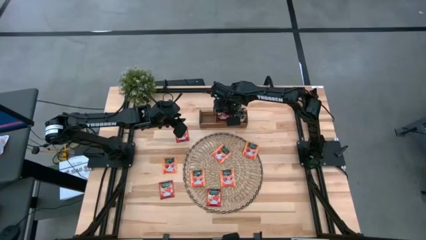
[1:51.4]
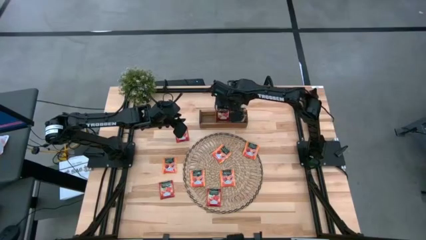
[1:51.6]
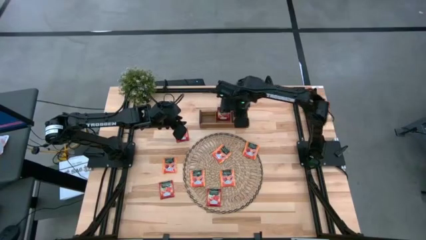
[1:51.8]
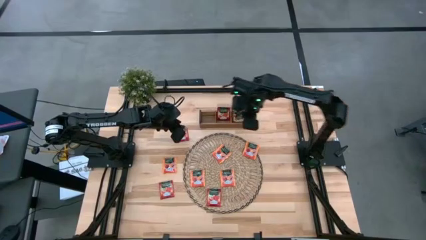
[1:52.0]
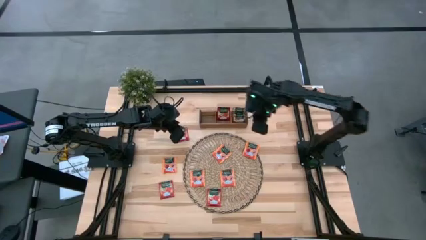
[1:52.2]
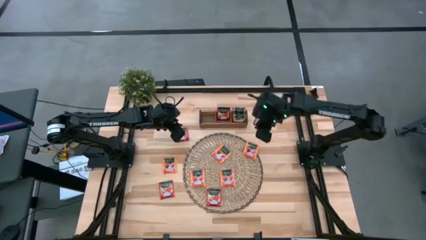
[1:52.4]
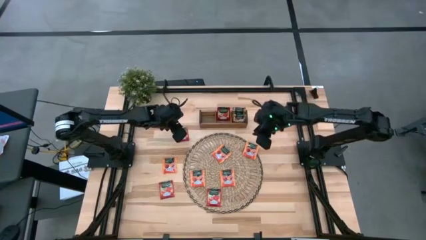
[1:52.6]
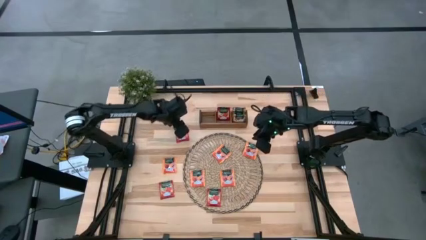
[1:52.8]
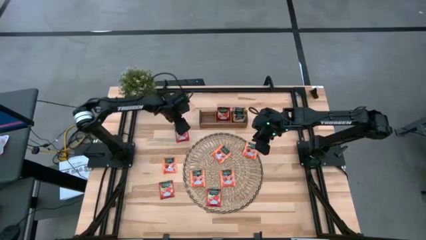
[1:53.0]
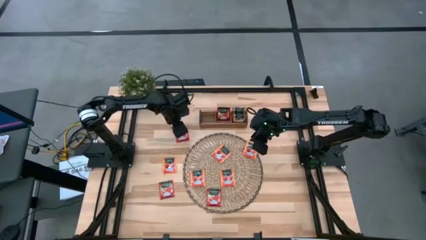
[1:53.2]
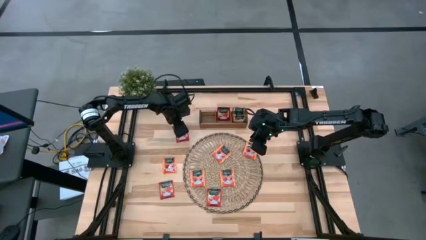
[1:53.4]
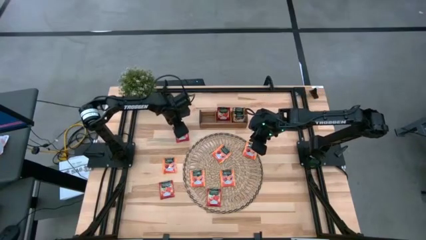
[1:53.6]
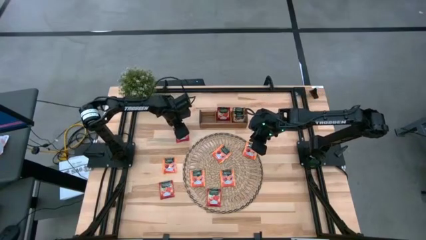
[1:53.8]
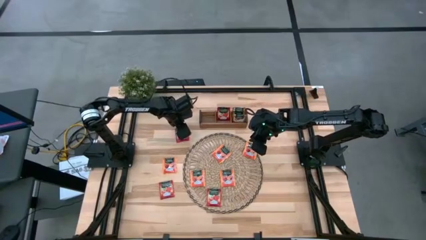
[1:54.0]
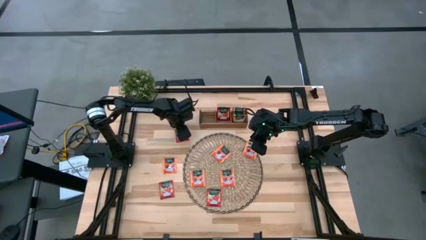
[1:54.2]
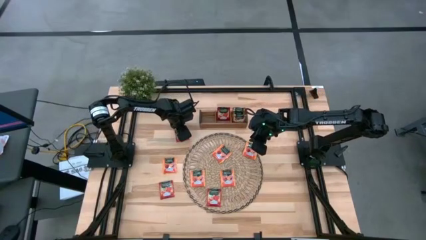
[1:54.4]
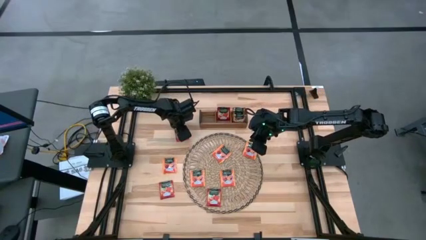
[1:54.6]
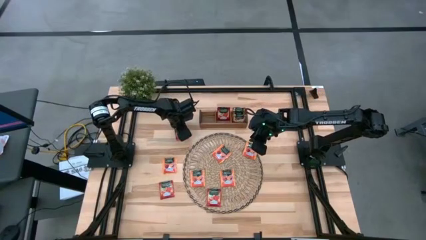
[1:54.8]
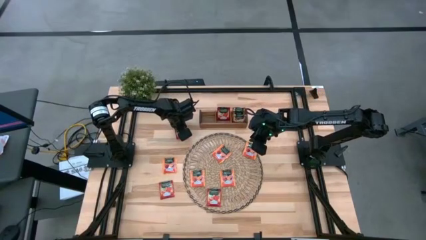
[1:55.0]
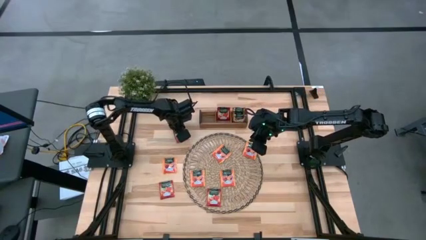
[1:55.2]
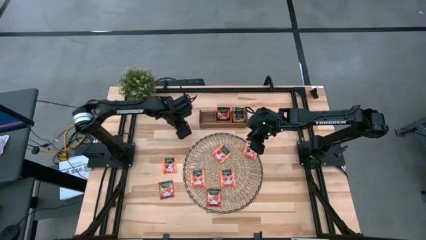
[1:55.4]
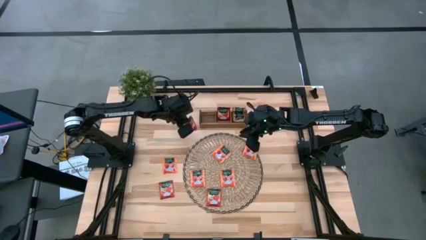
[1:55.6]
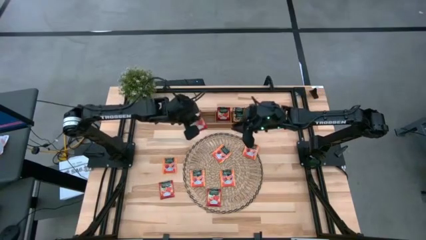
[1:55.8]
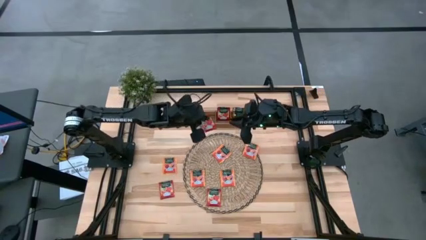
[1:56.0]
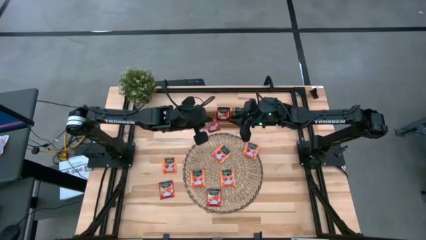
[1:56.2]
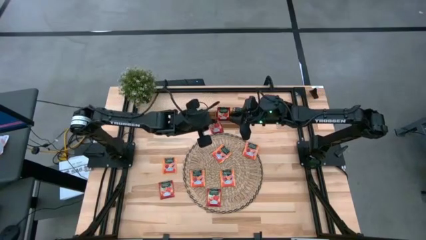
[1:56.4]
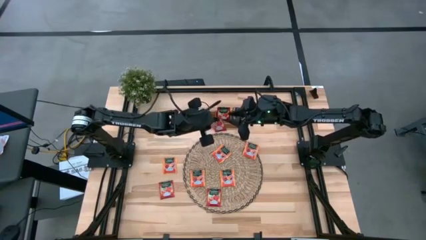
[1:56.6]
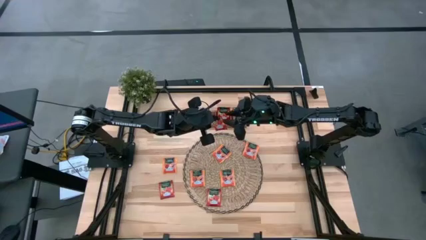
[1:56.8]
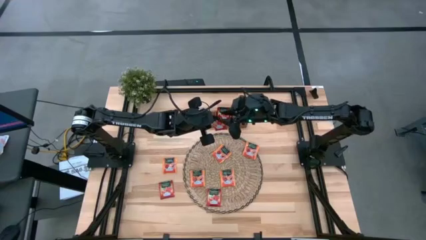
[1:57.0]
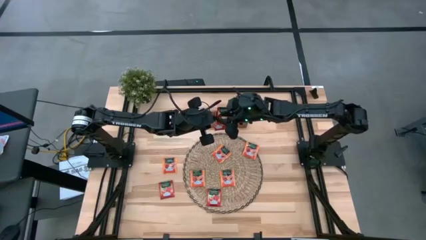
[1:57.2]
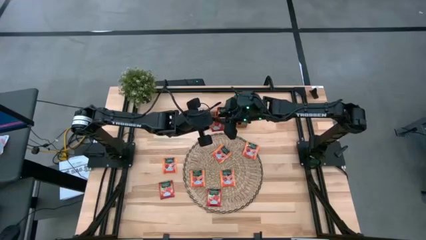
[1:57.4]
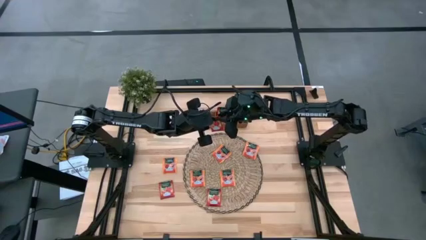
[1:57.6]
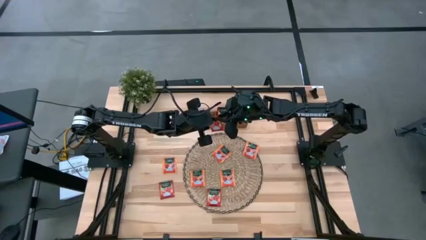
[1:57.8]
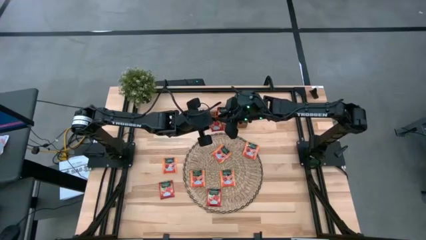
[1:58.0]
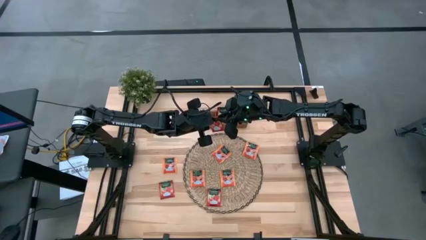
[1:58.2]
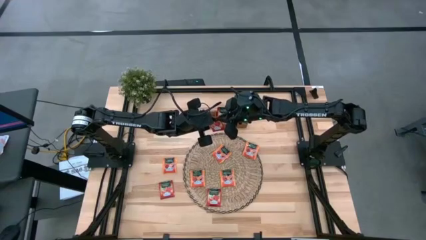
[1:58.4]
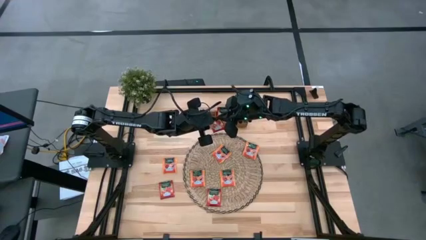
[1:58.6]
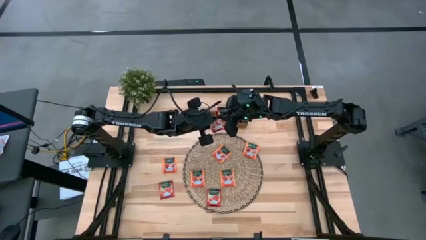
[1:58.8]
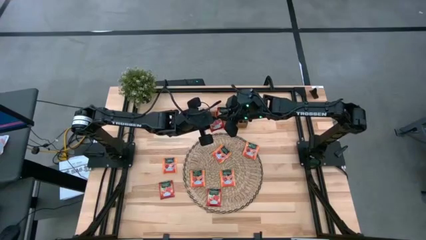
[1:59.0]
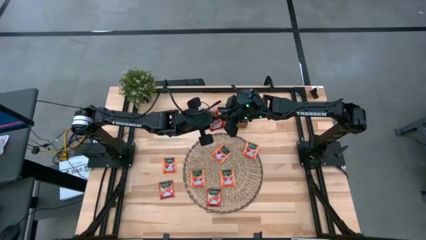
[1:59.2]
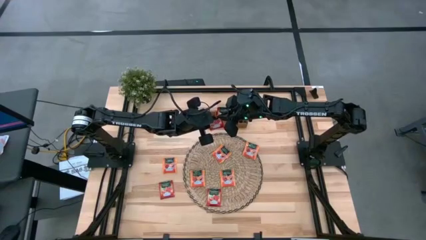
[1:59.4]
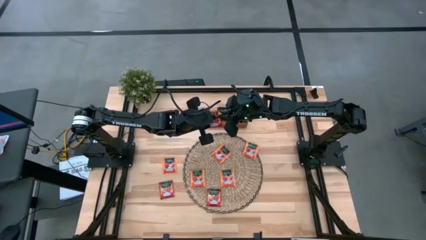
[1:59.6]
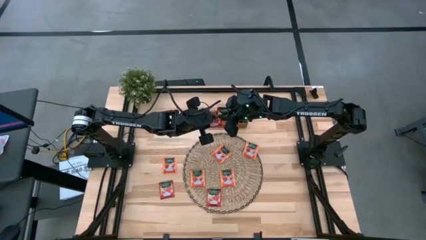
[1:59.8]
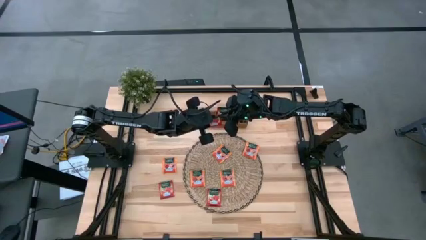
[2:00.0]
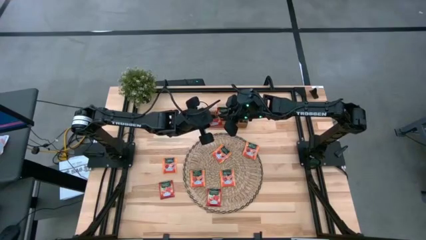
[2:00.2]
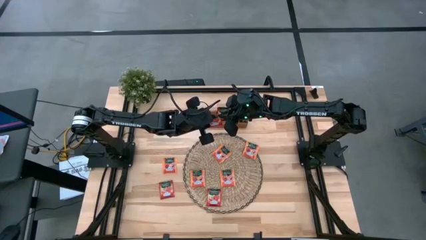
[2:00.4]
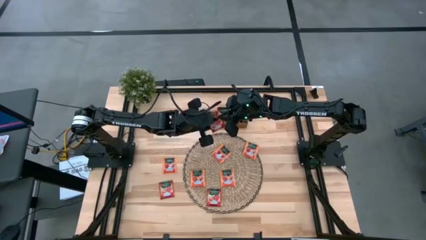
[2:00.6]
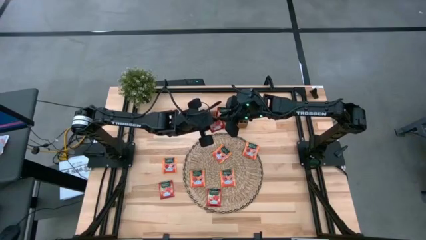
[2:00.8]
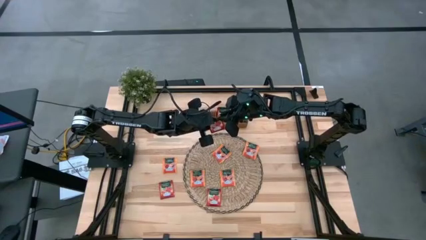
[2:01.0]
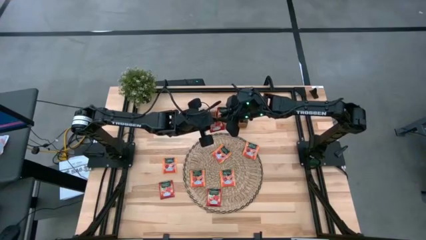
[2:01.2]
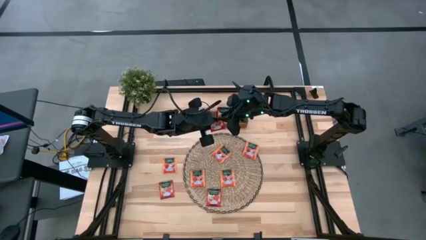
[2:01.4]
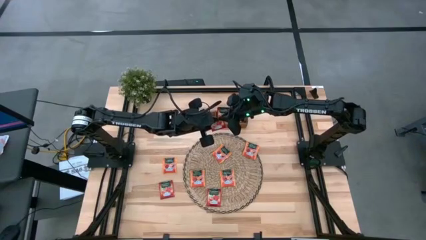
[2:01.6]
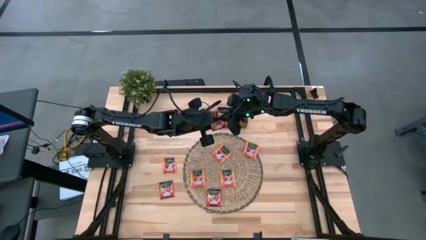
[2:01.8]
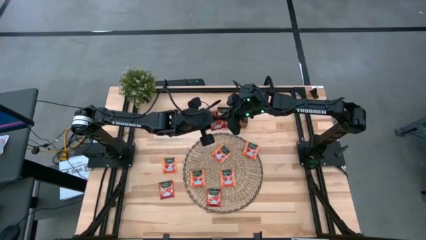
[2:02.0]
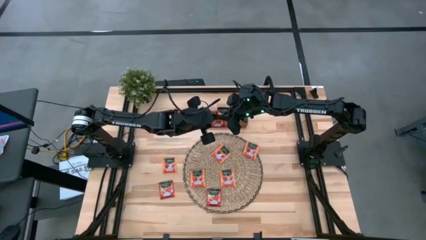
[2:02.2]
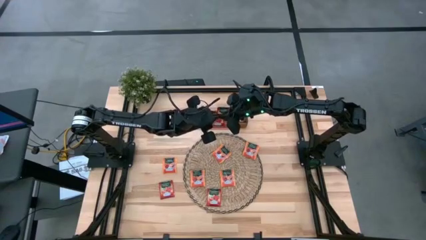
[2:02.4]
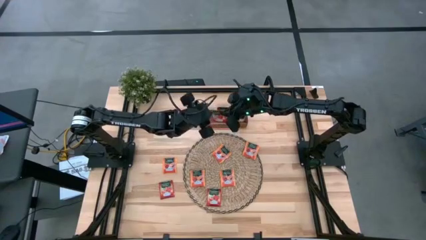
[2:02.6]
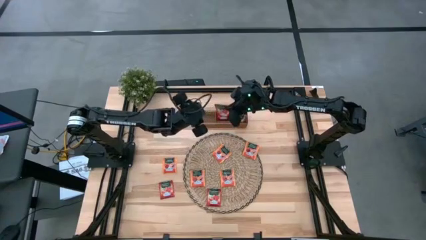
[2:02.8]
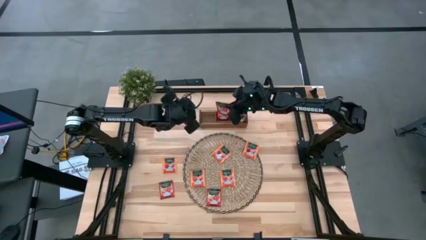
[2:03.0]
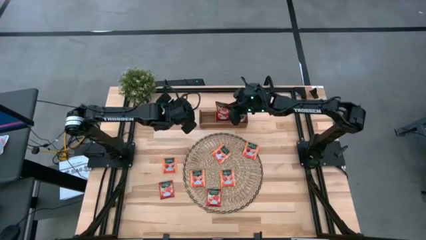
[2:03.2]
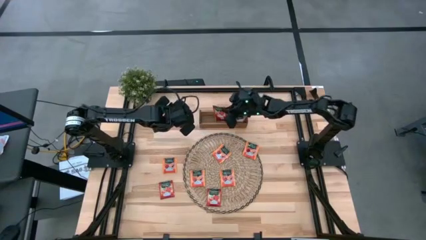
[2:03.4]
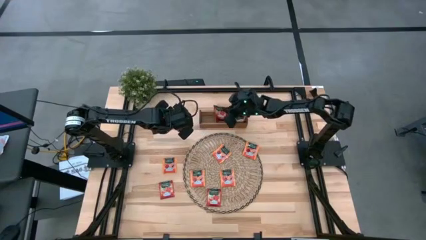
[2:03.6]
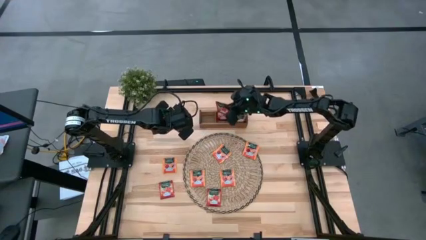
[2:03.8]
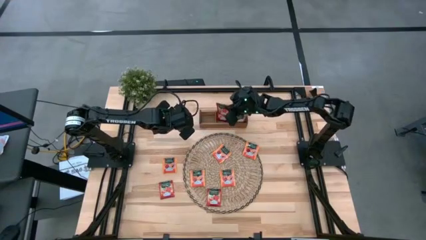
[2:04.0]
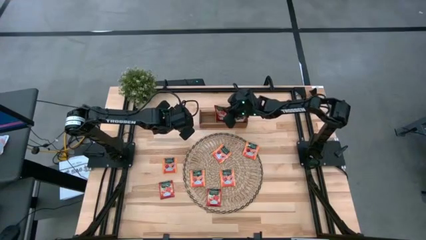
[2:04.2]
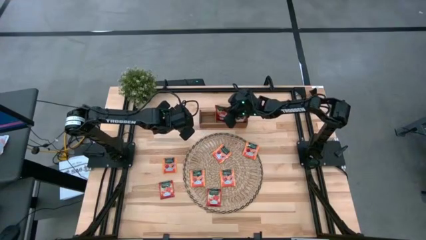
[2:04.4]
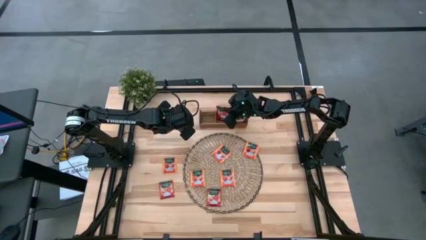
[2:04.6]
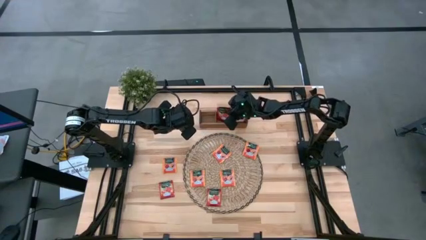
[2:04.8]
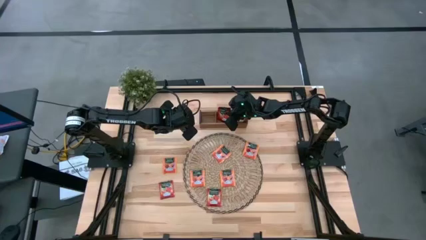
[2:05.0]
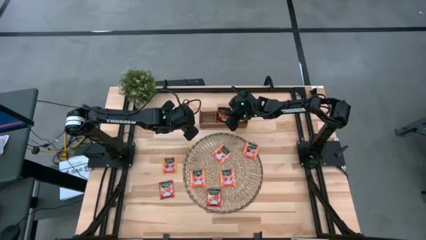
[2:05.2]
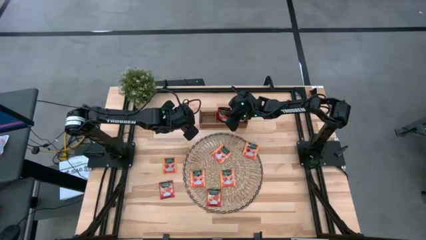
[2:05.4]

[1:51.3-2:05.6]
Task: Pick & Place Tea
Put the red tea bag into the middle section of the wooden organizer
